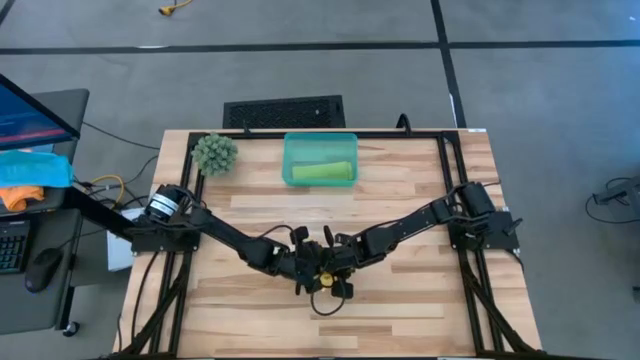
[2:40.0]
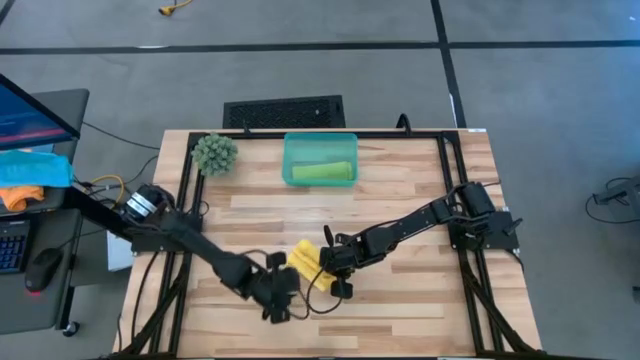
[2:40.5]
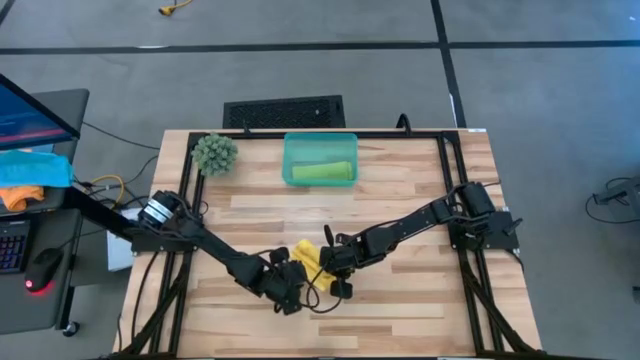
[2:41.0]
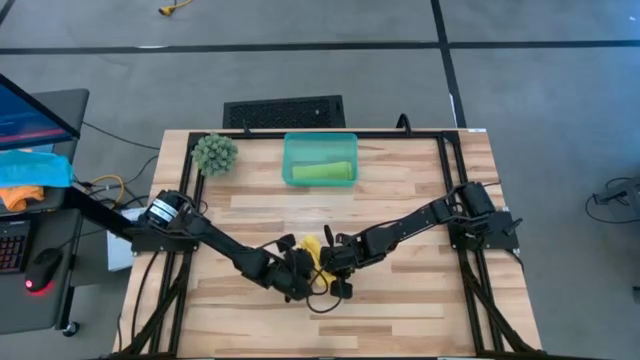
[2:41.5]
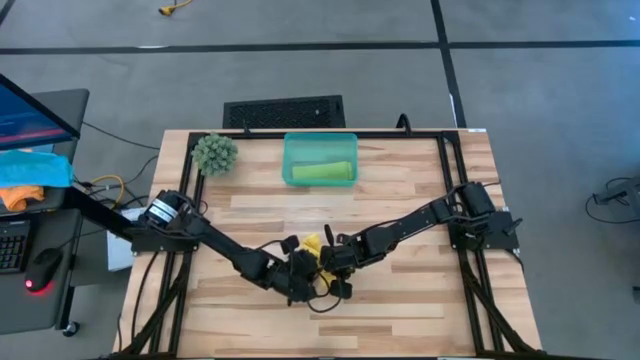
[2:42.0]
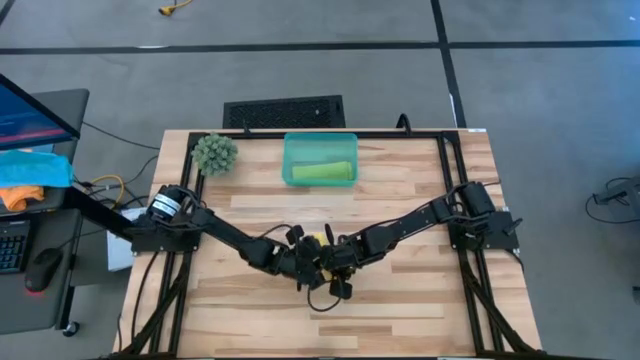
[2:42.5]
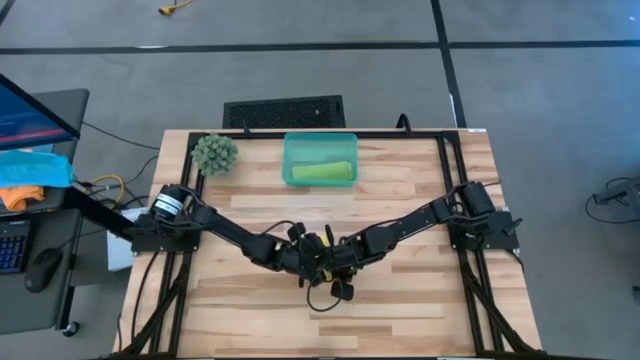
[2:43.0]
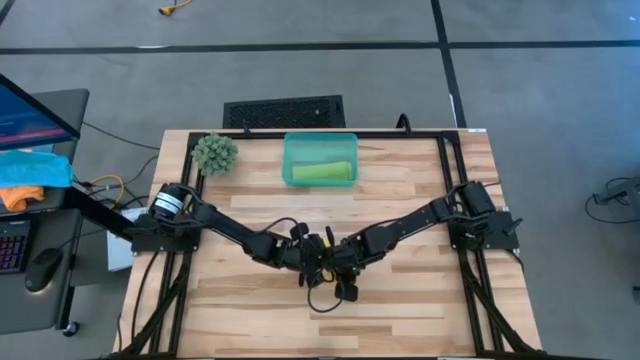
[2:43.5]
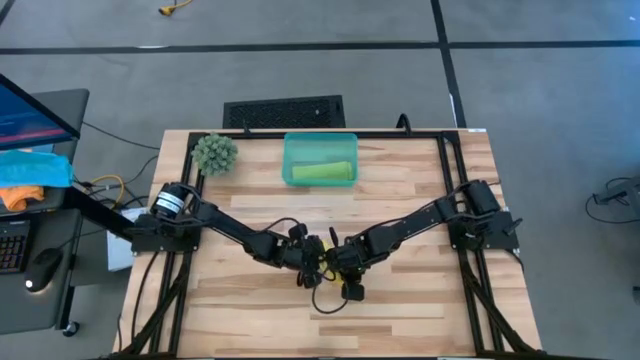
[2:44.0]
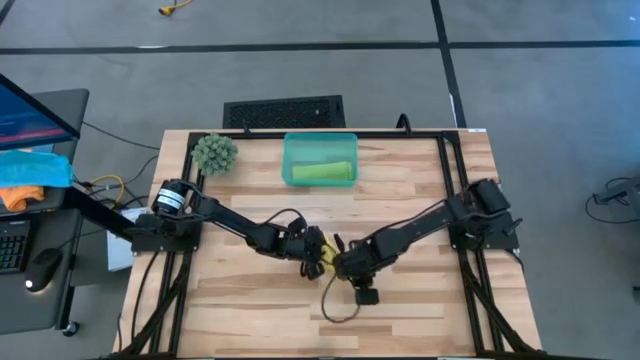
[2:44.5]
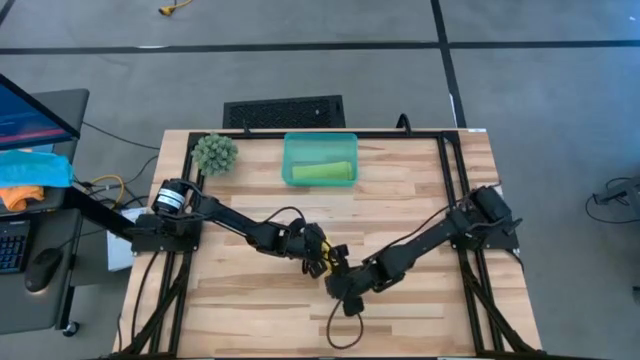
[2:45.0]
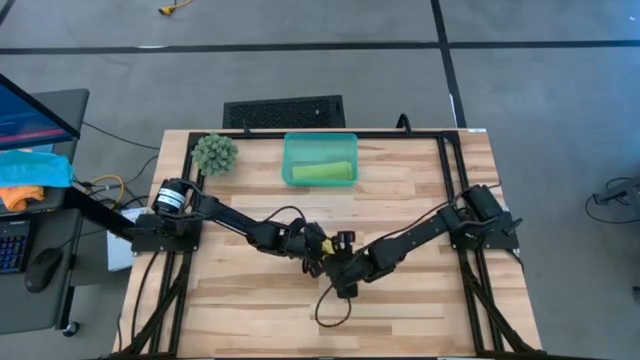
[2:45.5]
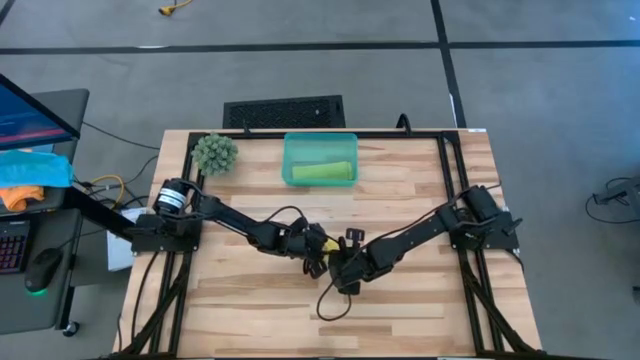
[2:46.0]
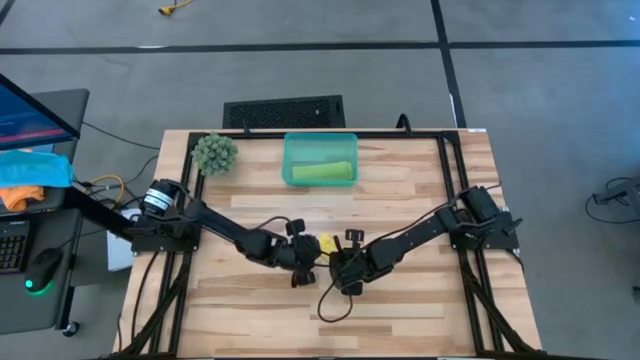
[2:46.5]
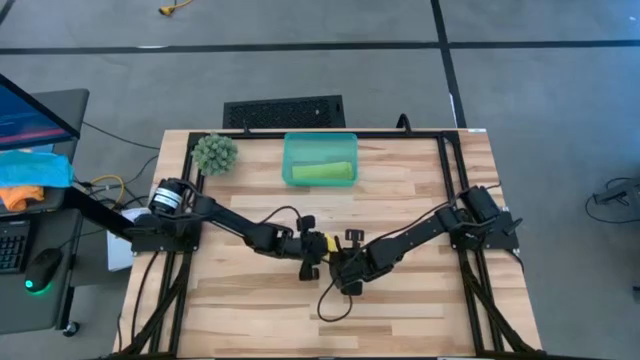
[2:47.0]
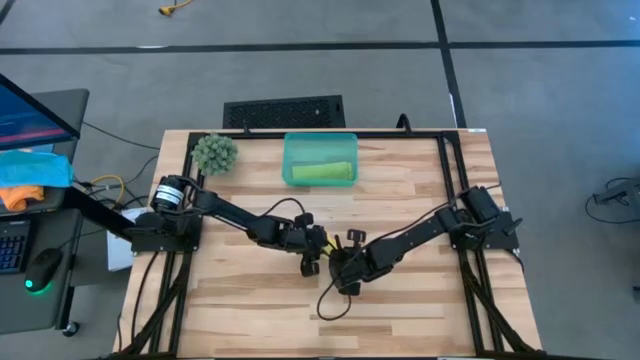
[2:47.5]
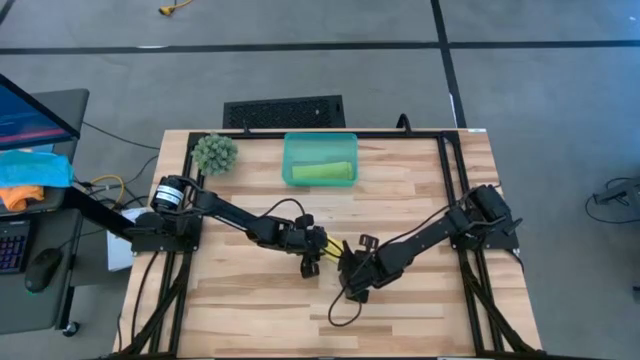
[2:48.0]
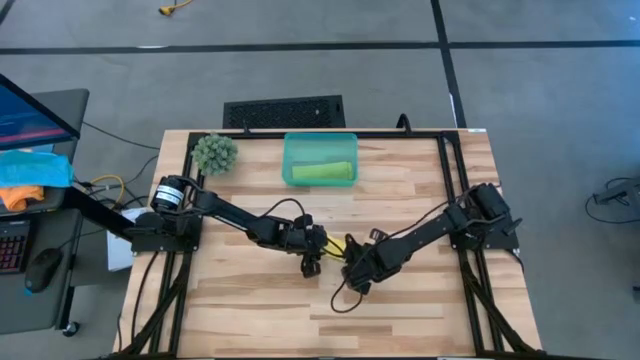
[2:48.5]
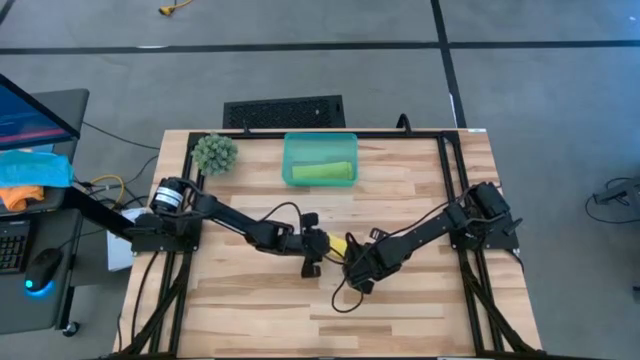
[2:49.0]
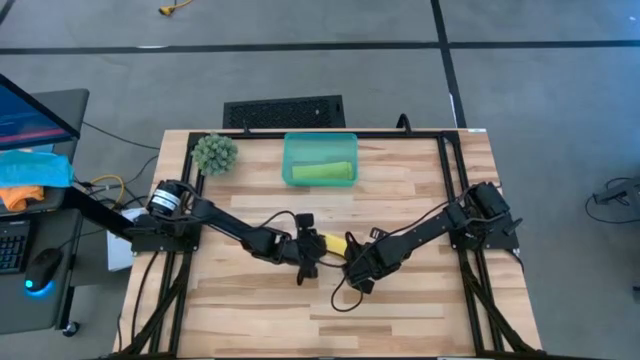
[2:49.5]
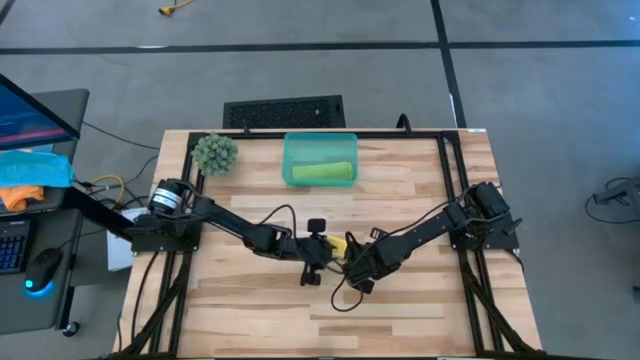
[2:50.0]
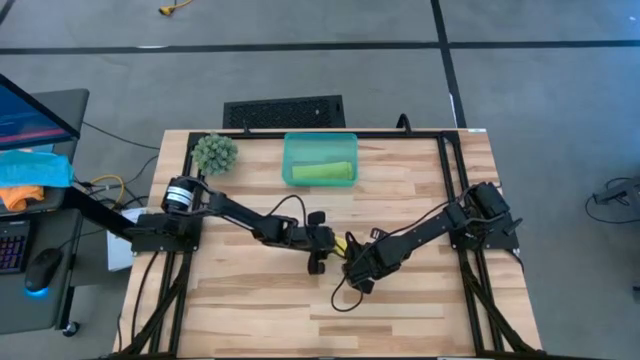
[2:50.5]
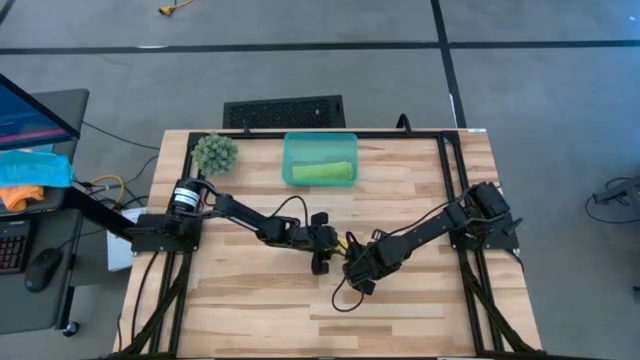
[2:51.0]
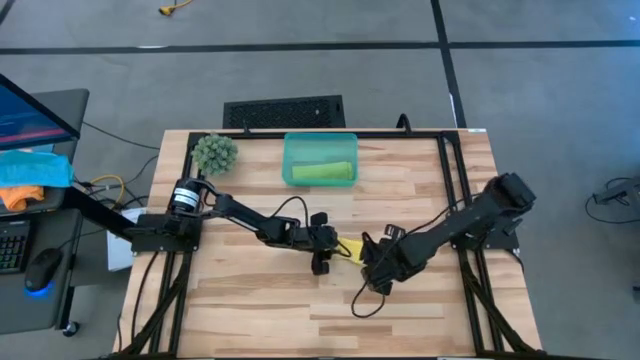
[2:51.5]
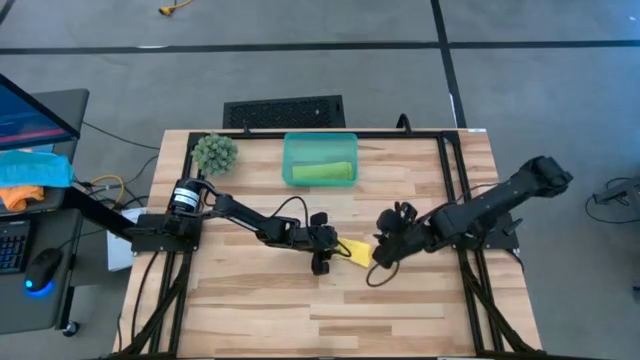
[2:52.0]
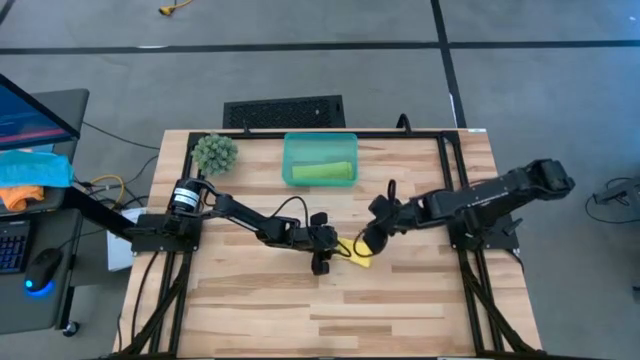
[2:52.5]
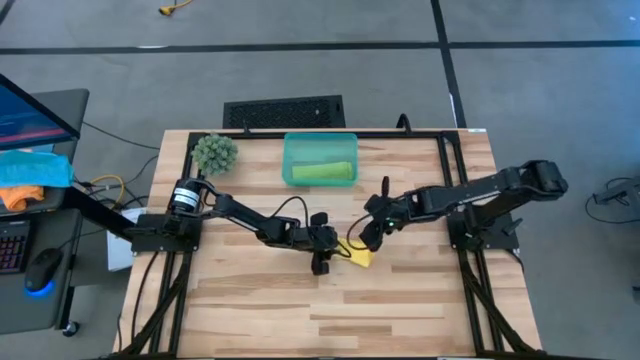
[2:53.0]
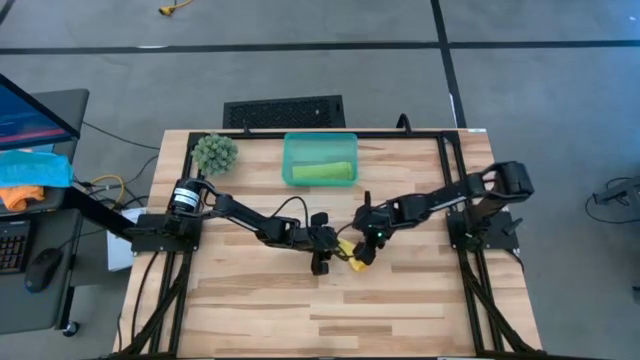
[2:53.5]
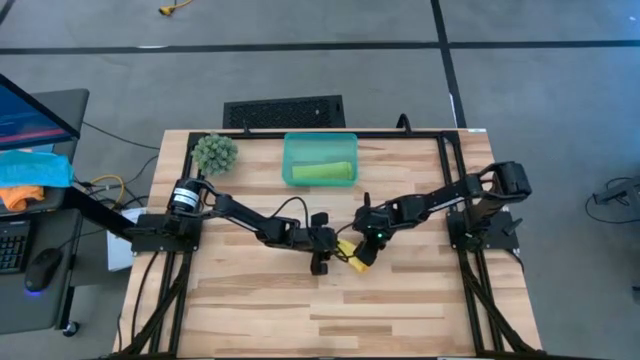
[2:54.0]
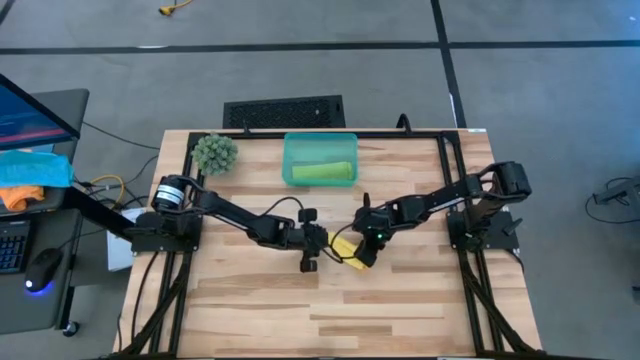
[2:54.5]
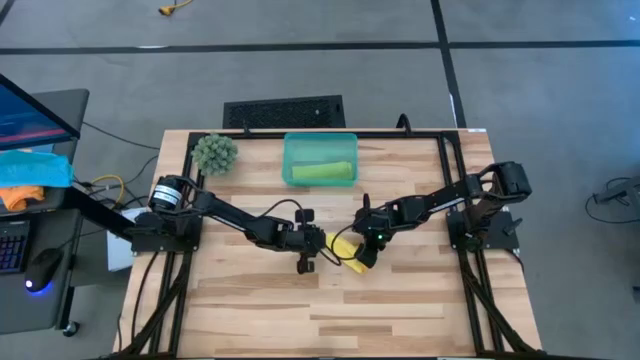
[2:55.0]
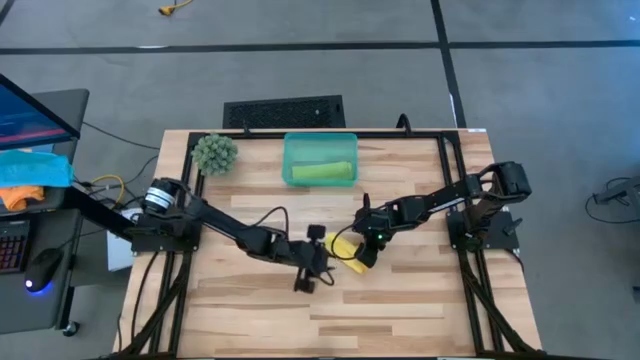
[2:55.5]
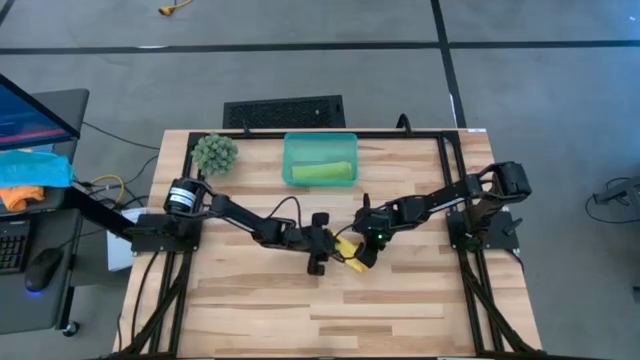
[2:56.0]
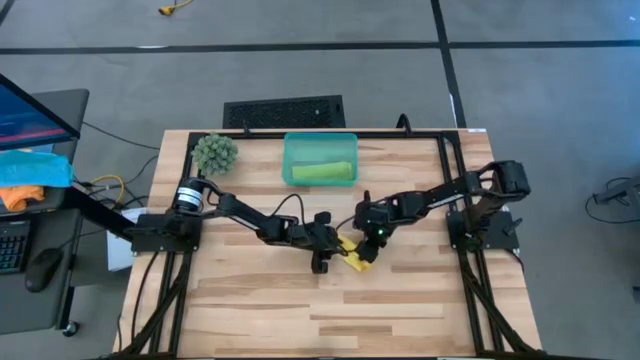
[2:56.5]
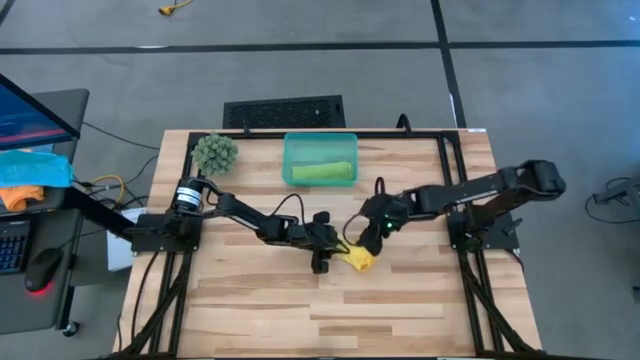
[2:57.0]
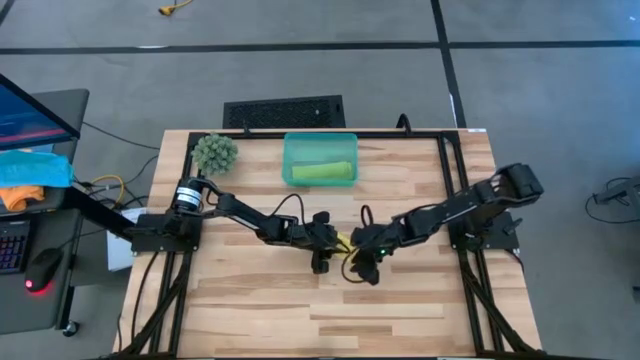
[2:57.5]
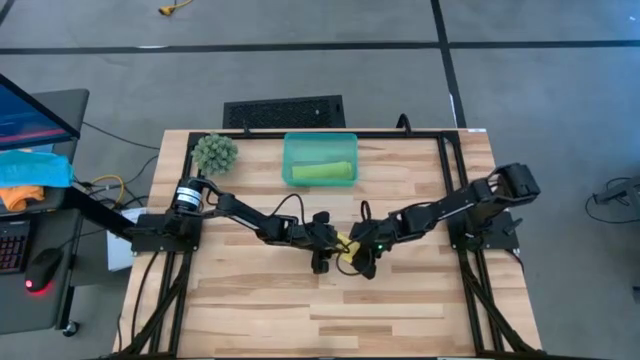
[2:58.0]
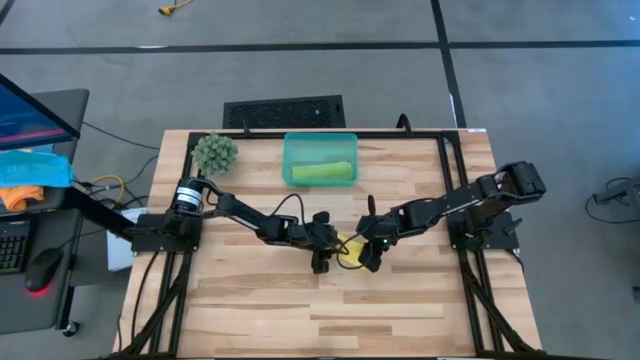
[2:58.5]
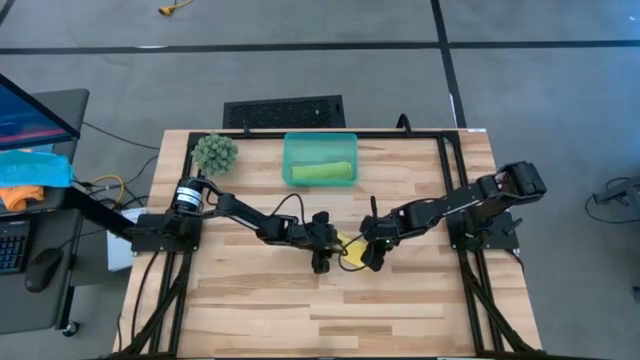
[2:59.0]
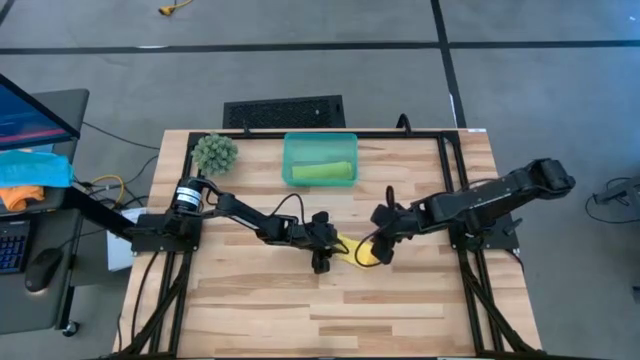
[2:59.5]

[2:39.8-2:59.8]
Task: Roll microfiber towels into tight, uniform cylinder then place into a basket
Roll the yellow microfiber cloth
